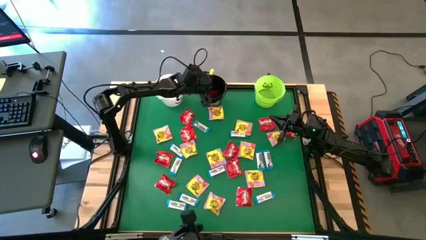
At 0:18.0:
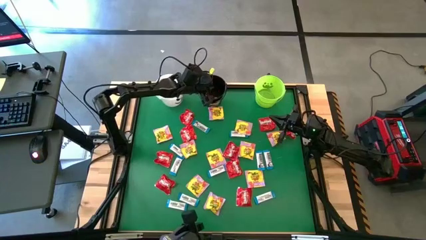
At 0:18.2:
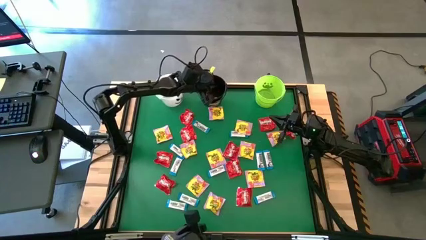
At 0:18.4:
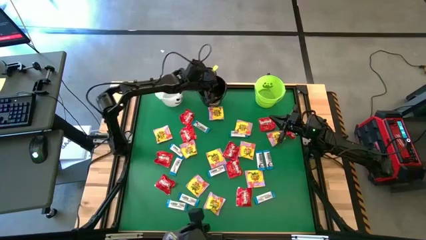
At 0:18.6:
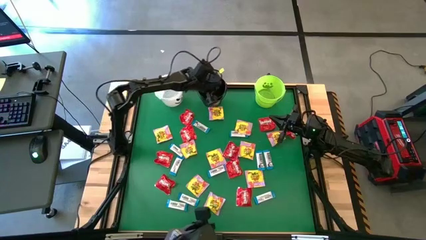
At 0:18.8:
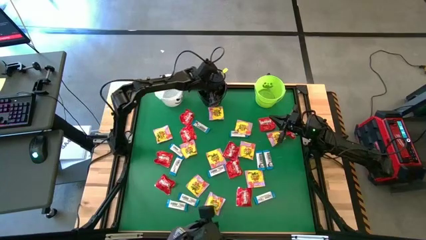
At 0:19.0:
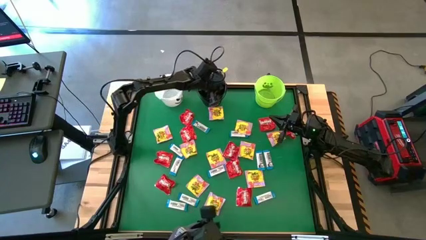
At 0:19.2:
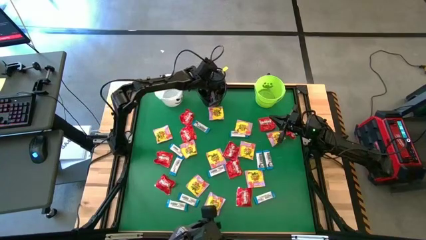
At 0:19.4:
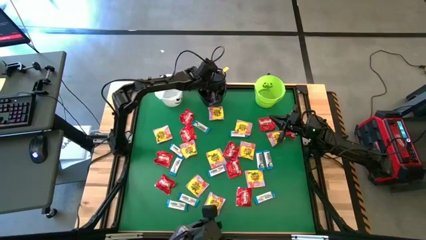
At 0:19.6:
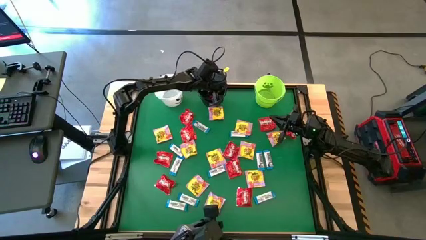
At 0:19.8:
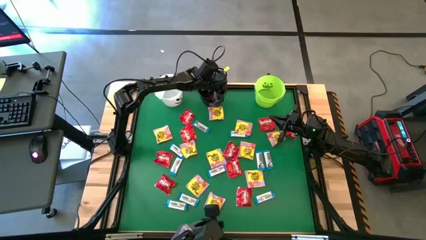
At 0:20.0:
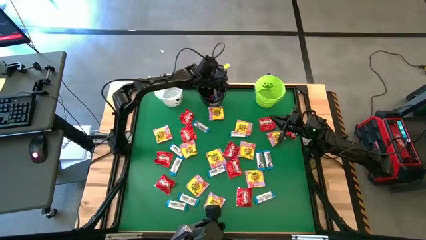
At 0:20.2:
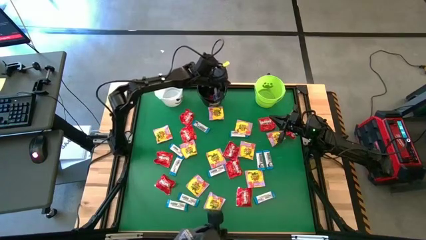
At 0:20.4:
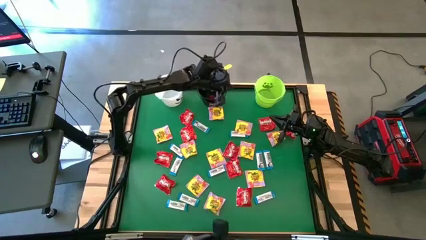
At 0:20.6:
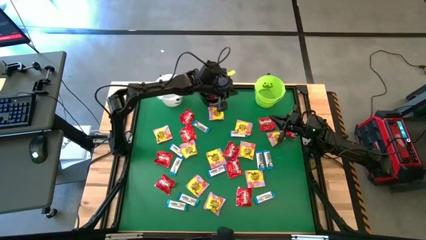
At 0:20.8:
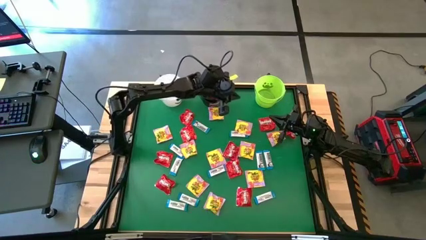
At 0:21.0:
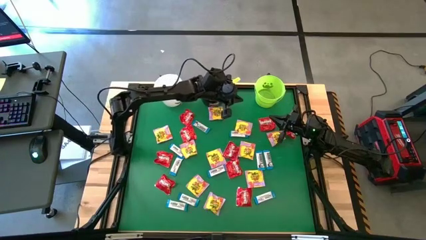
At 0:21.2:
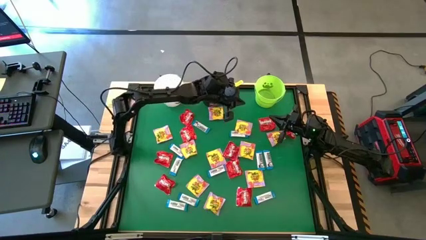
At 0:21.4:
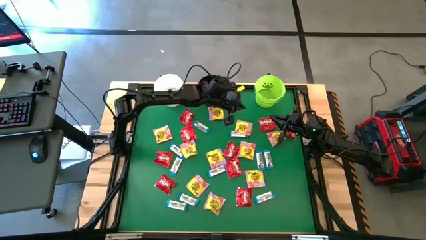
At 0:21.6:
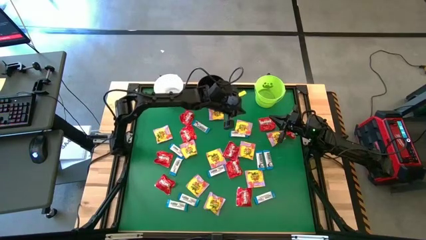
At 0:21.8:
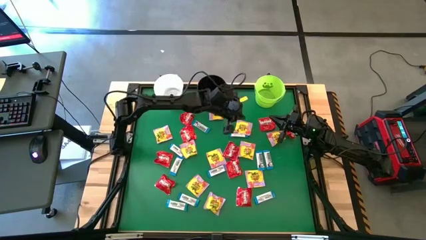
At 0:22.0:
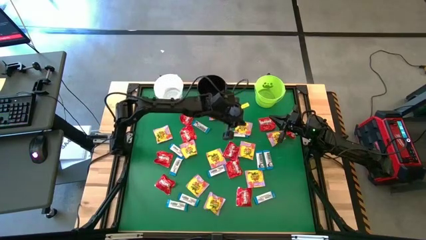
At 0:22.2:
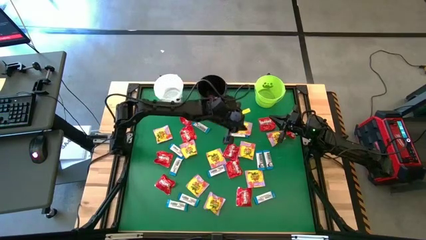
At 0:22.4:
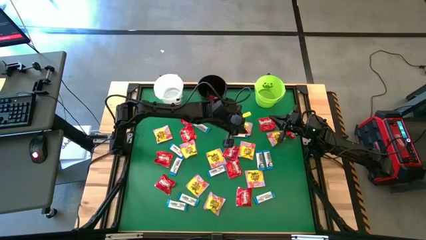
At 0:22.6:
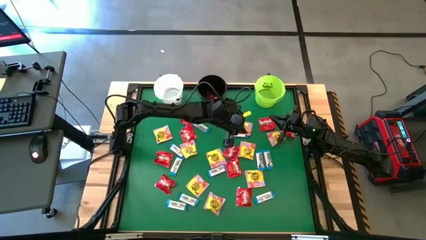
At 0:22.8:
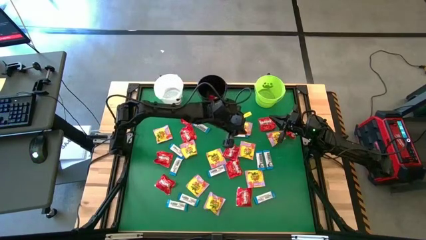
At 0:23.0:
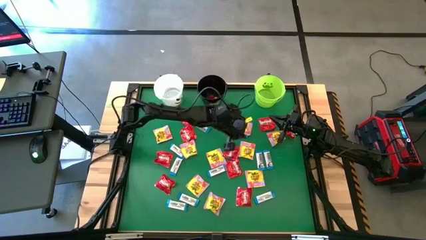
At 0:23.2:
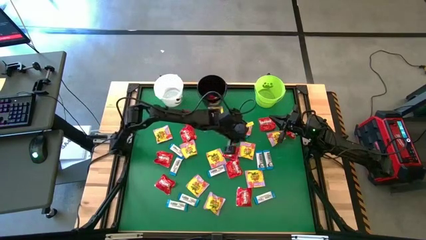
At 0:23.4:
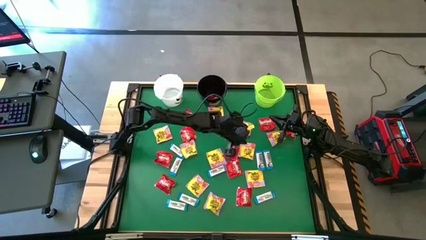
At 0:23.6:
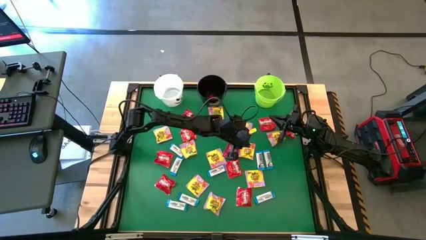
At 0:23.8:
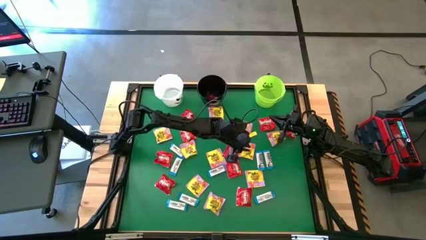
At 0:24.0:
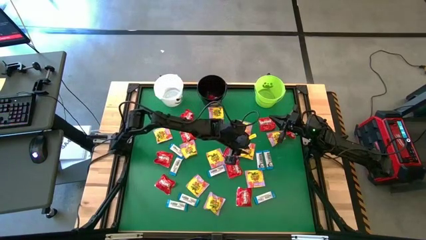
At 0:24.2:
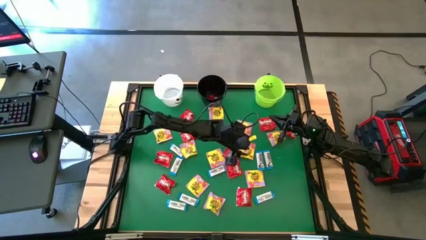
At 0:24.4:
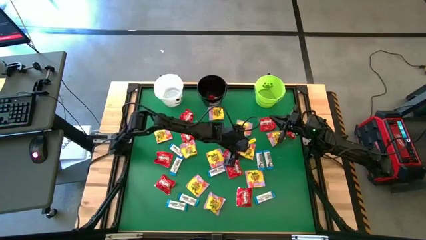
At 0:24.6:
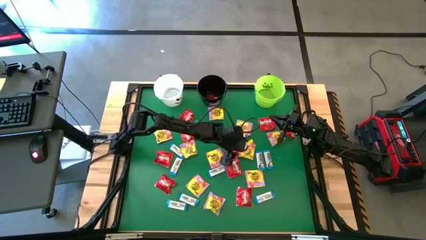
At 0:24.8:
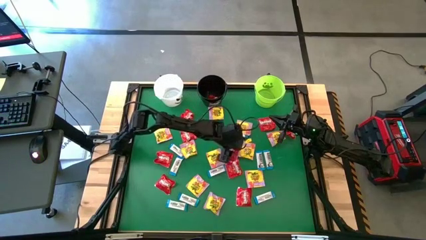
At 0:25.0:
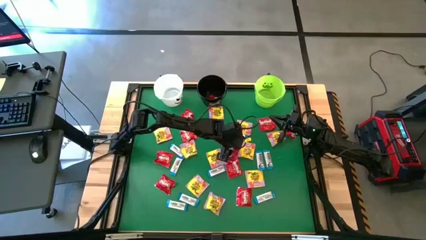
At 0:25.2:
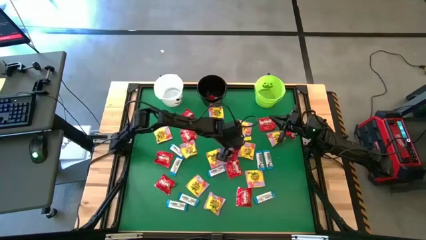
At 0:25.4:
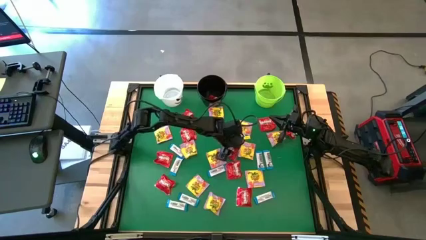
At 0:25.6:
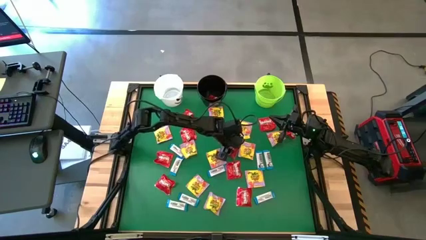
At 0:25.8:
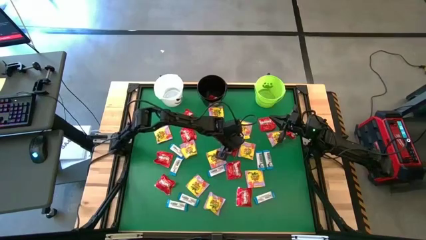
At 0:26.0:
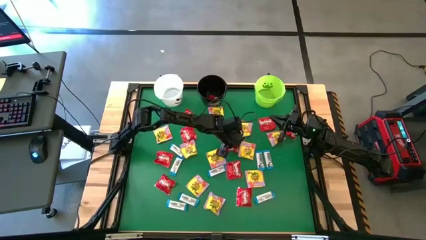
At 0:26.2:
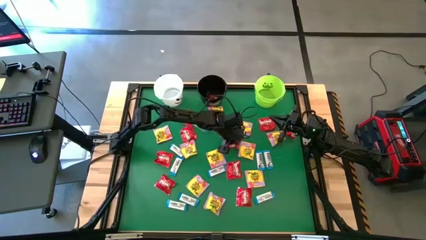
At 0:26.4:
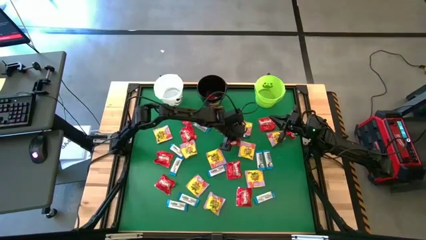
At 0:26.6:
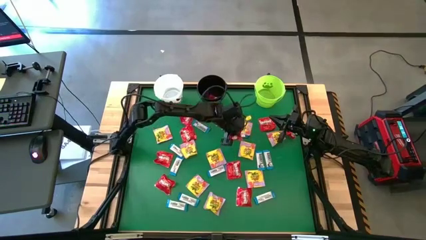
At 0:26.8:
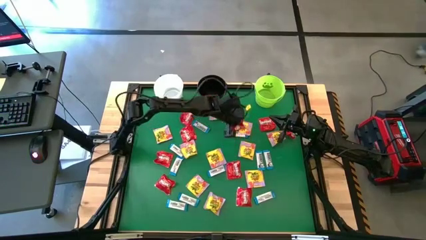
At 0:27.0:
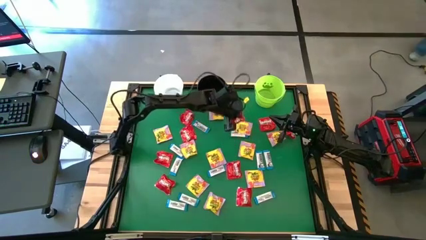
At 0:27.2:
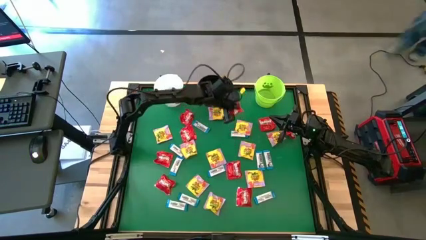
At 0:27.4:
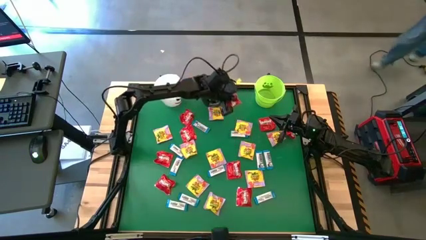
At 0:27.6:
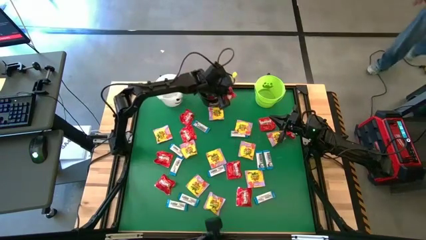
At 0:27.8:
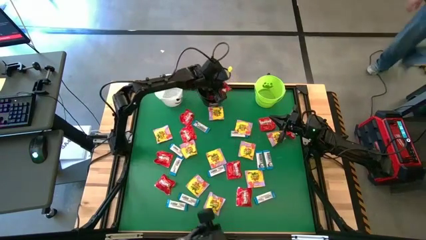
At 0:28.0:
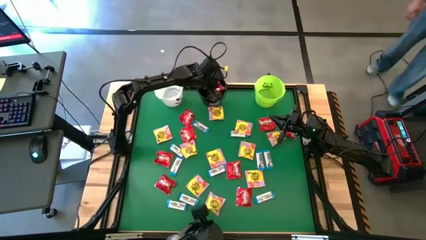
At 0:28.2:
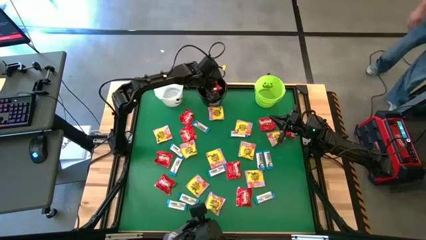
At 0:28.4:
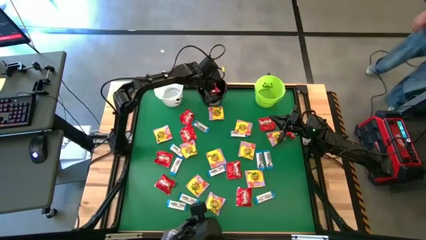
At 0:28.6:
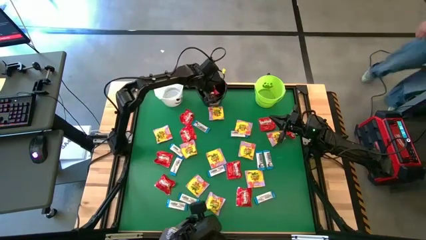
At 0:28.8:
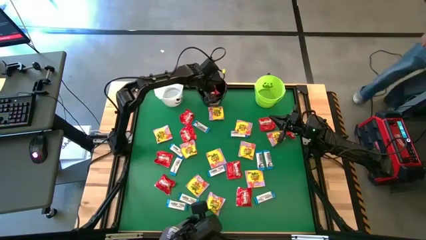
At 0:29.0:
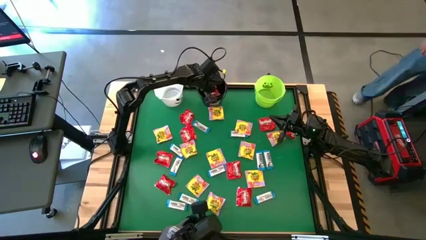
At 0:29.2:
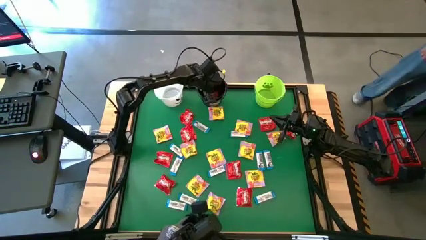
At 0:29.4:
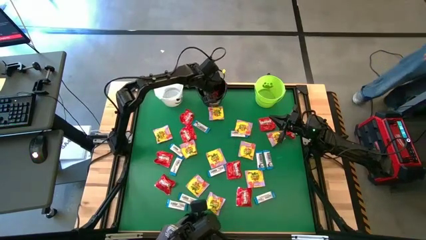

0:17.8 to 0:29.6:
Task: Sort candy by brand, put in halloween buckets
Put the red candy into the black bucket

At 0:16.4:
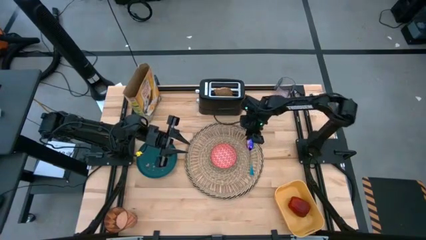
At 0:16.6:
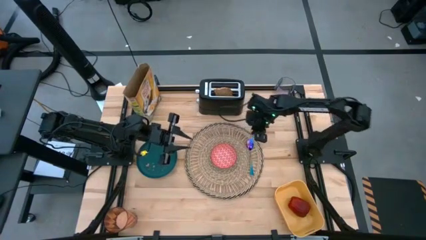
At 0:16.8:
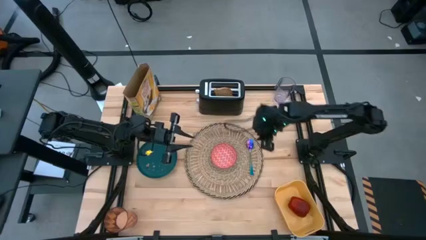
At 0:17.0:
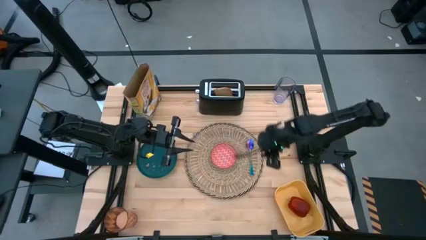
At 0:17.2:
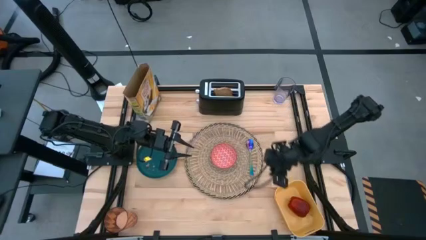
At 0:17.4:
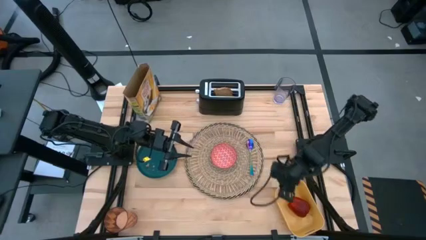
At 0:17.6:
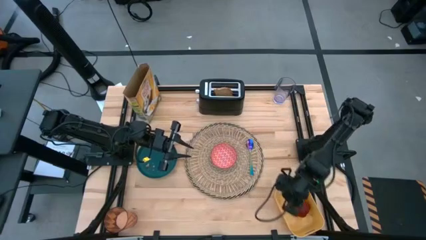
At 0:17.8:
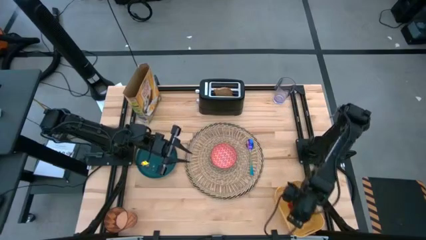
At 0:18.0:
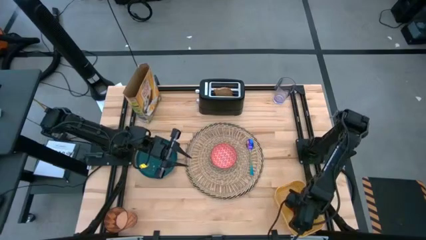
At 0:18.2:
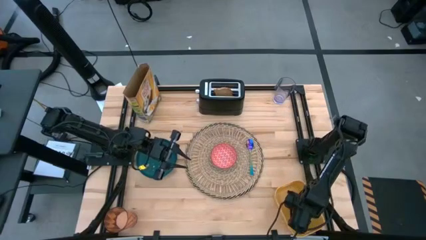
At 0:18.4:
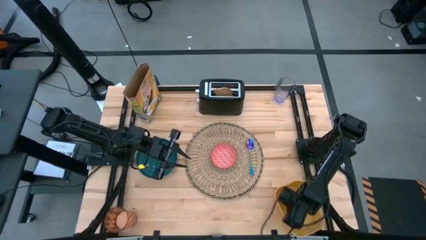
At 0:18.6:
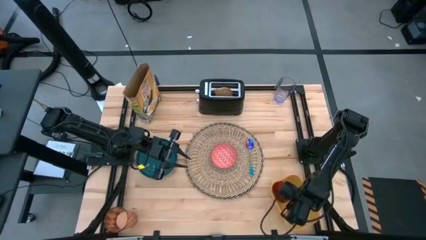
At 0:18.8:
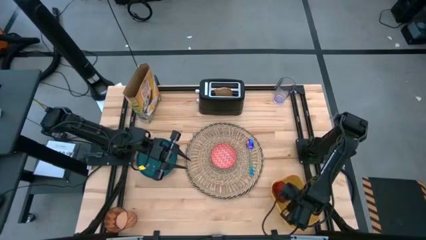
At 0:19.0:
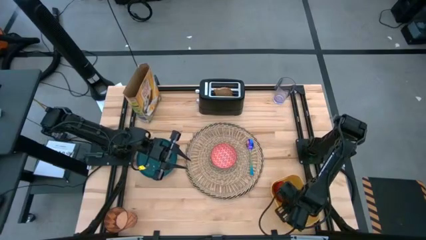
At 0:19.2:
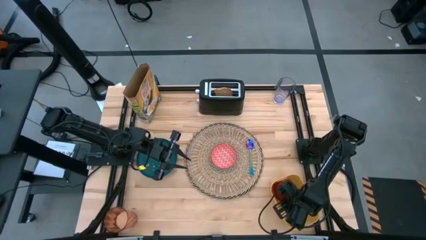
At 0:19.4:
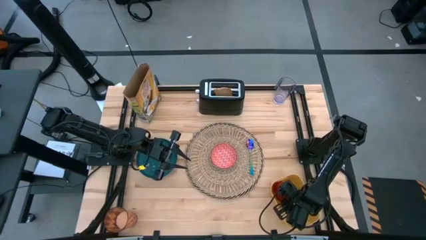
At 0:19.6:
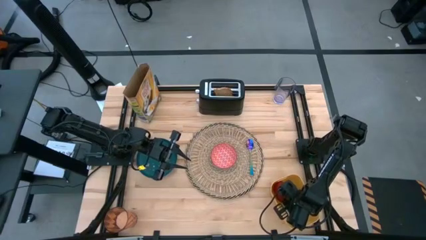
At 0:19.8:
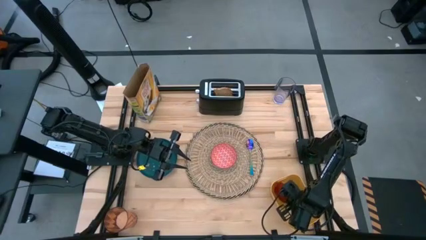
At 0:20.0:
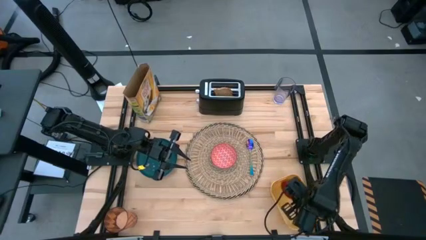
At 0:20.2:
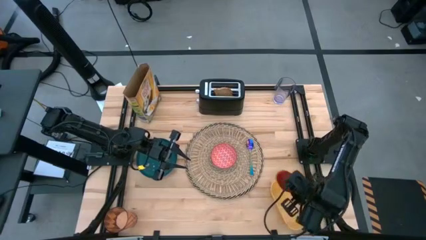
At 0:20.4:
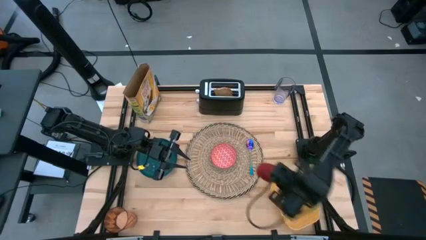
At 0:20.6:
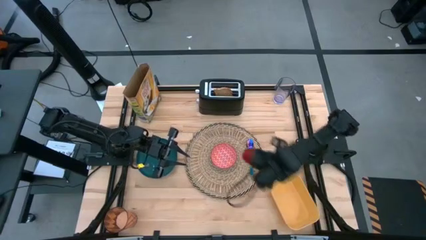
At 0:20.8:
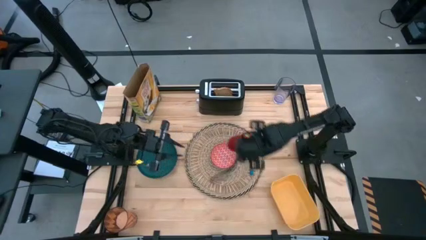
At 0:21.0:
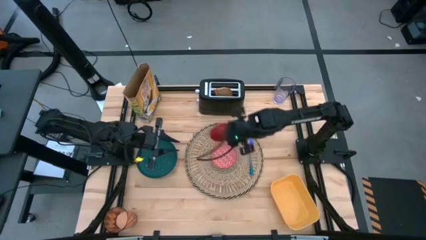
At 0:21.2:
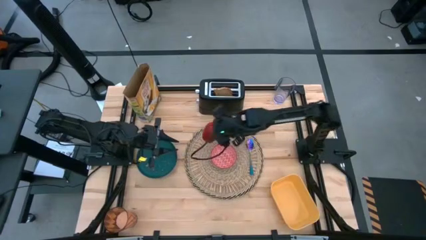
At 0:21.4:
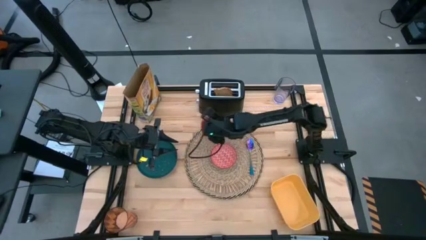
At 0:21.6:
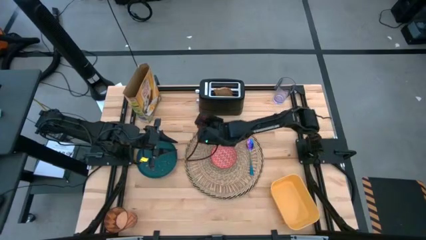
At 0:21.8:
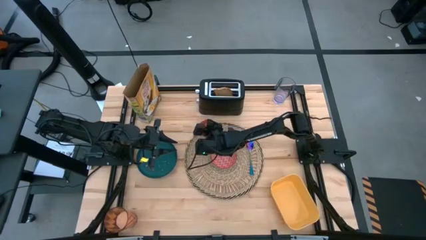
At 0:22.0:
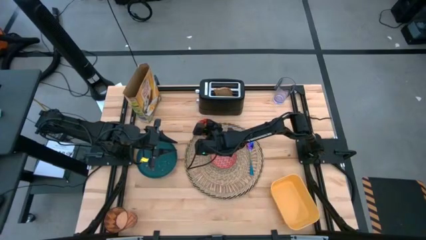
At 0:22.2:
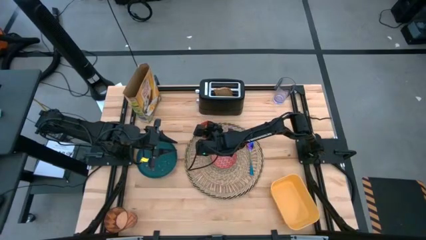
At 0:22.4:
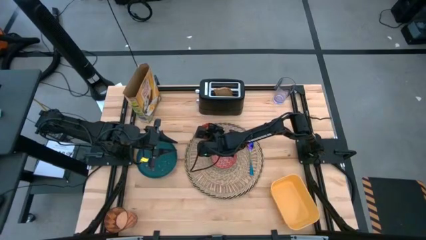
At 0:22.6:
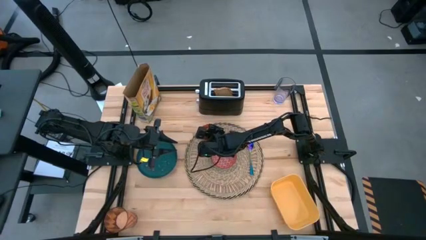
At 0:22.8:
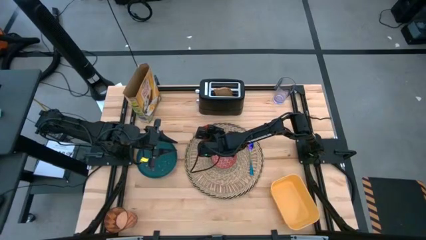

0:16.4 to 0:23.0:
Task: Arrange a breakfast setting
Put the red apple on the brown table mat
